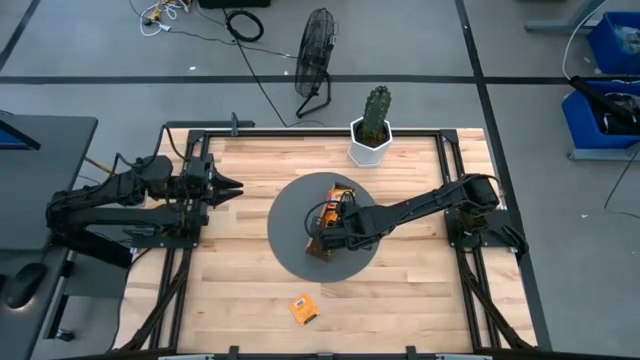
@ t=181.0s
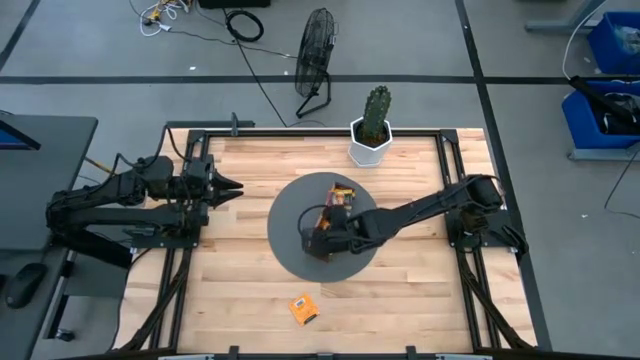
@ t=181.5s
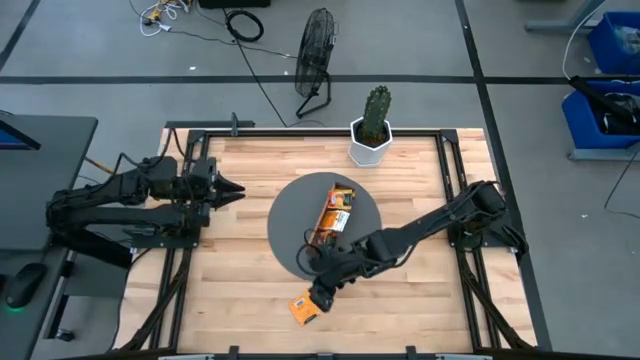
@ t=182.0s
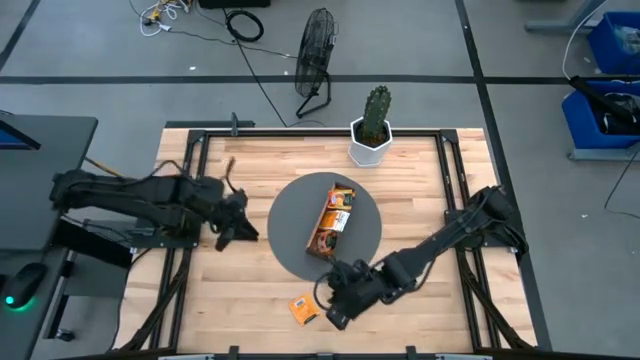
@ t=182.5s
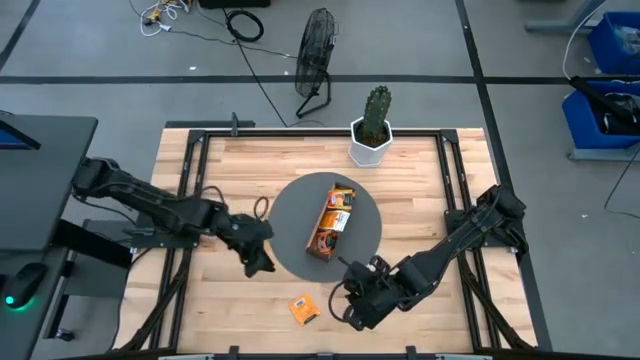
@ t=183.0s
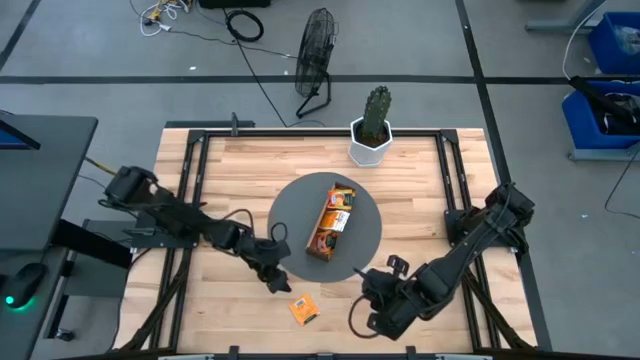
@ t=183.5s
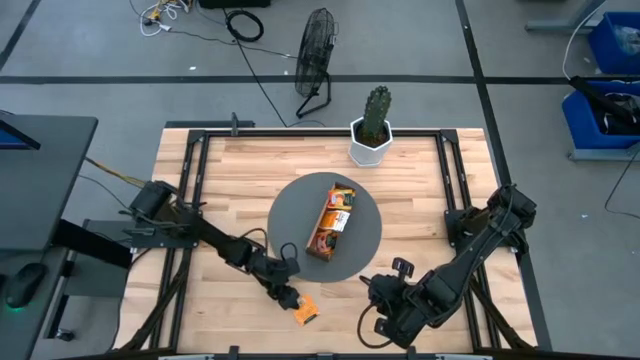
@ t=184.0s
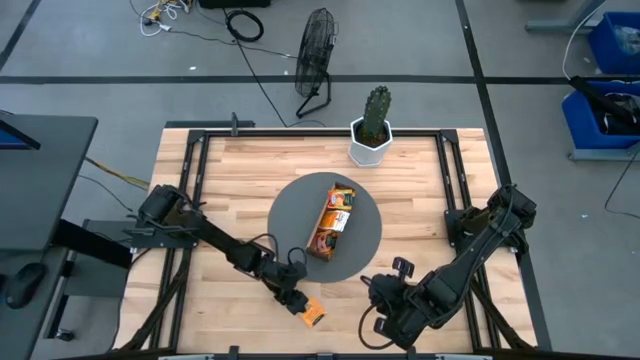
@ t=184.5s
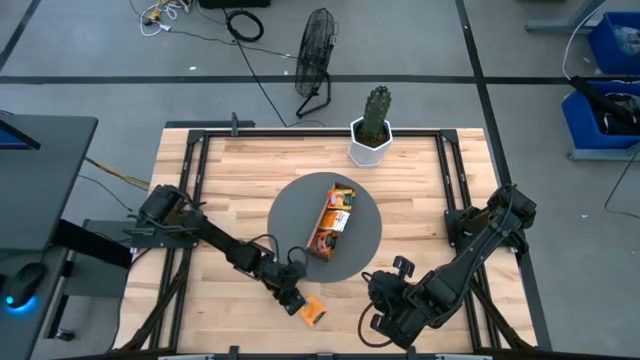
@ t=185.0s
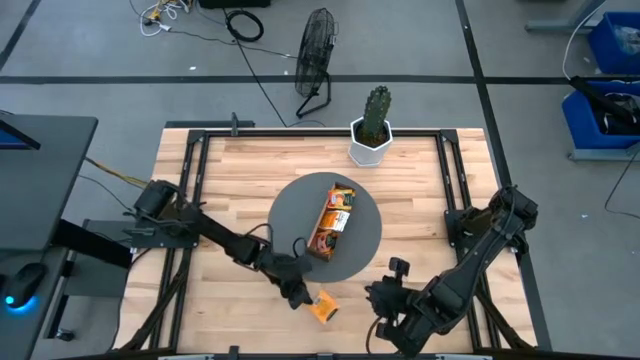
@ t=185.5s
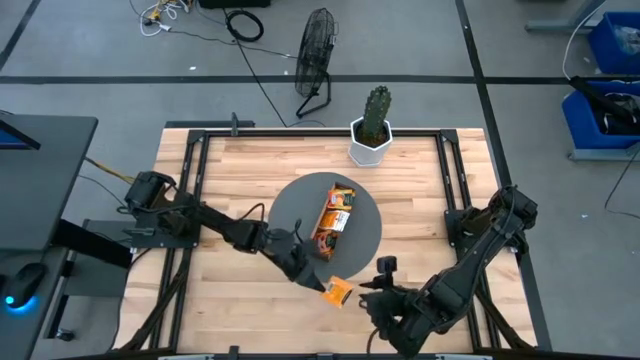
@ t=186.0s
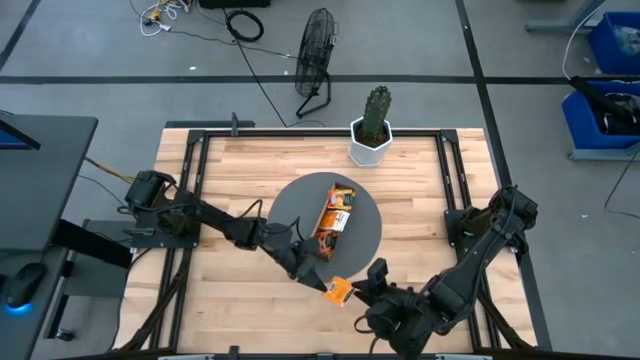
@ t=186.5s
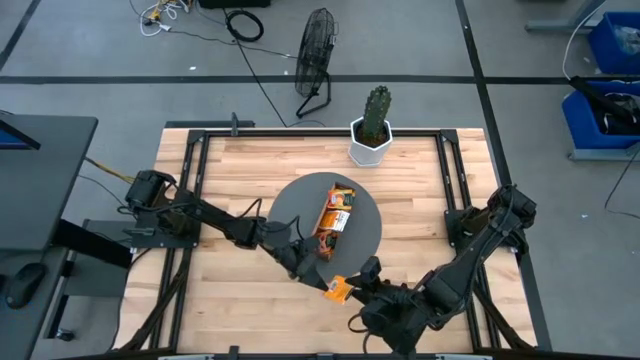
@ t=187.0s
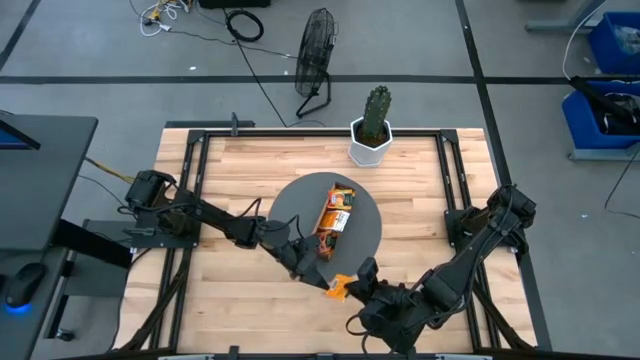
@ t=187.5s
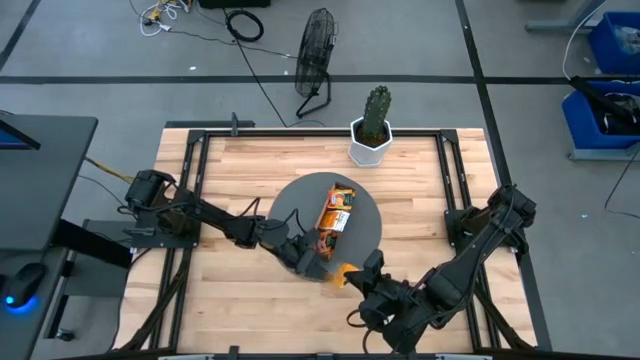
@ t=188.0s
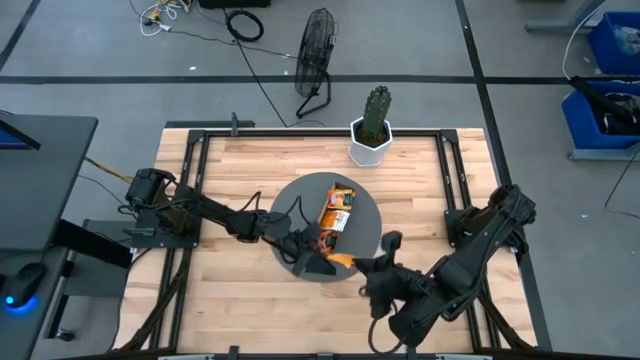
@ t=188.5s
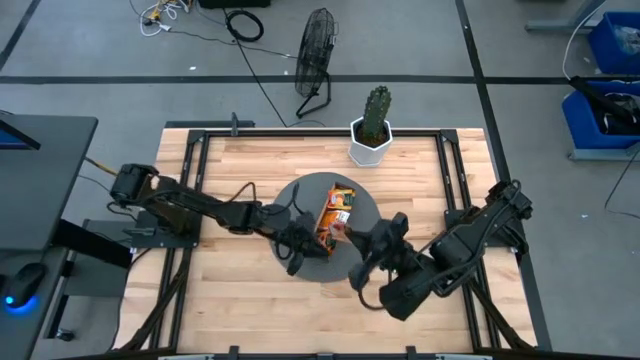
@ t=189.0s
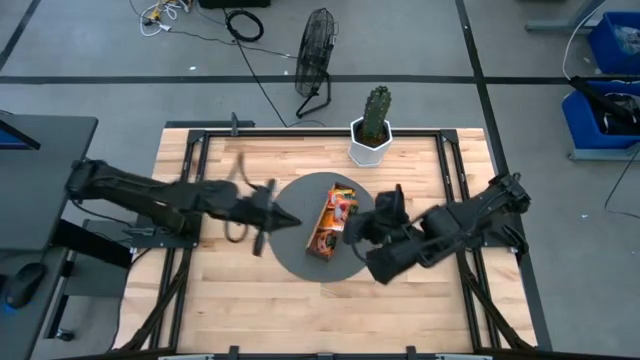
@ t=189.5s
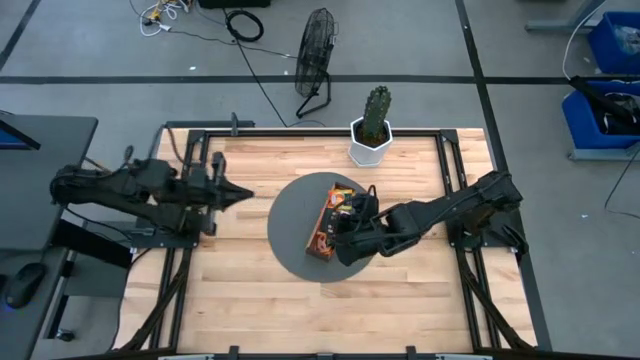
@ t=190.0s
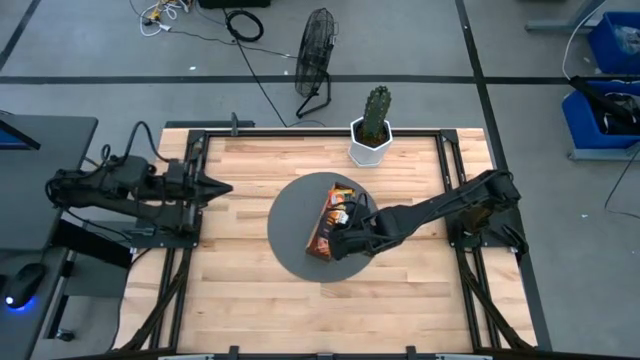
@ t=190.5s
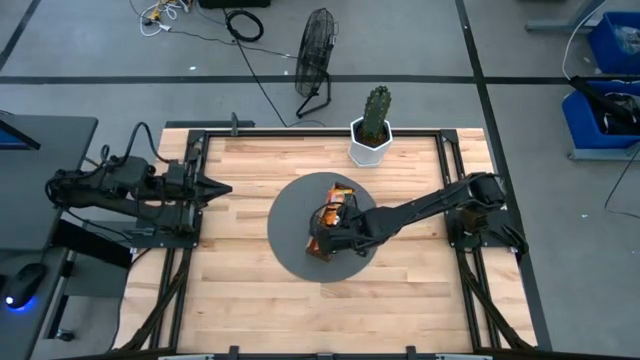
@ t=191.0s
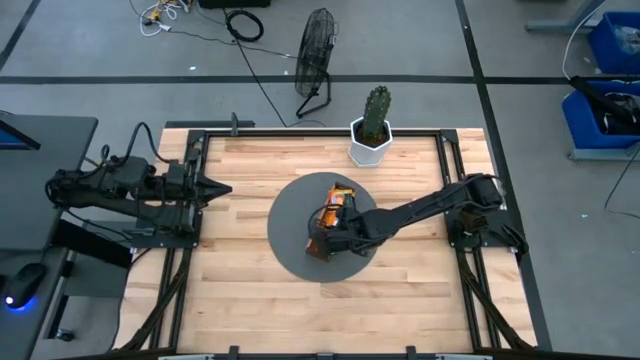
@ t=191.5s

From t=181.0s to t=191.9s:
Task: Pick & Place Tea
Put the red tea bag into the bottom section of the wooden organizer

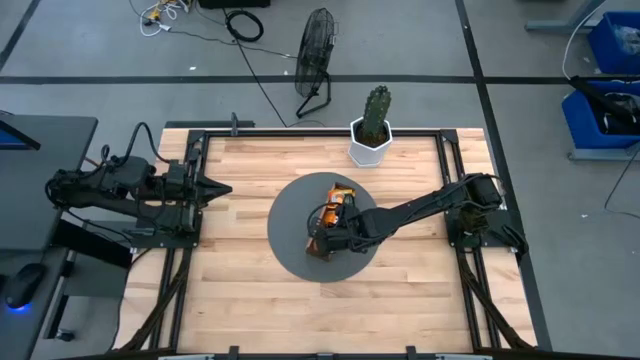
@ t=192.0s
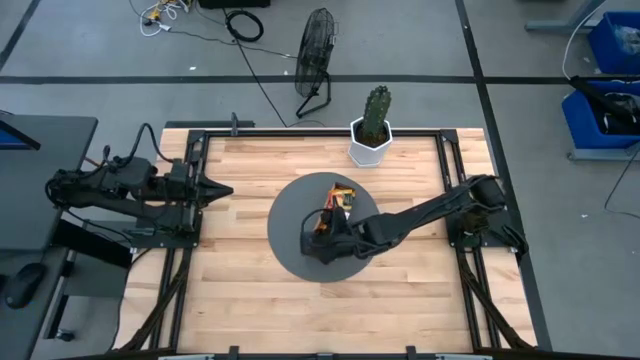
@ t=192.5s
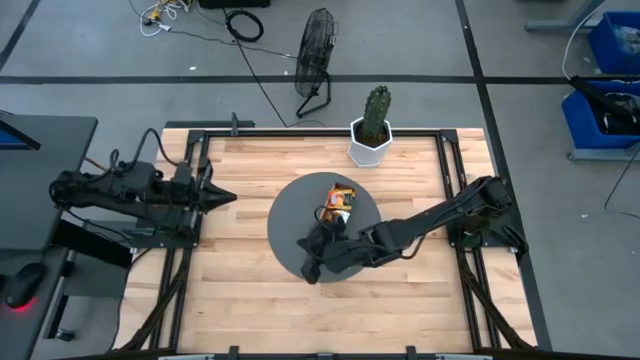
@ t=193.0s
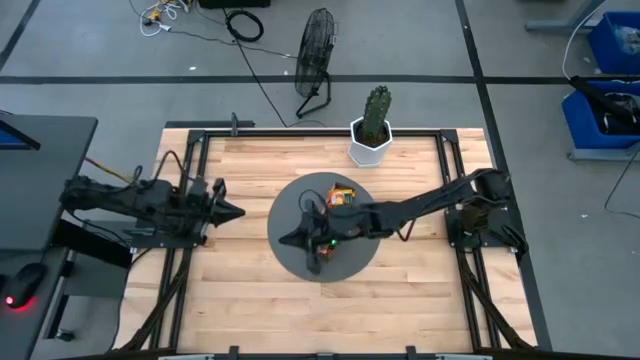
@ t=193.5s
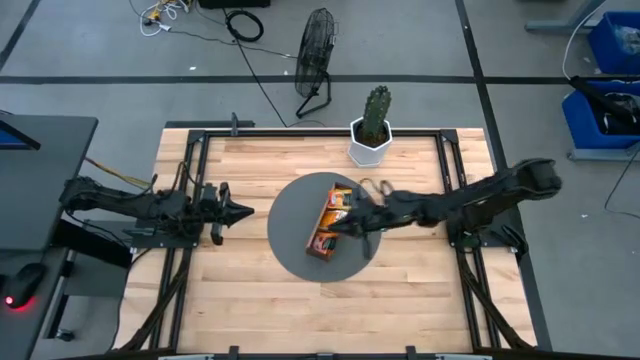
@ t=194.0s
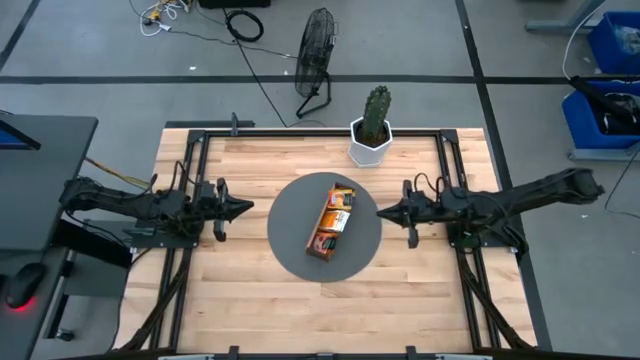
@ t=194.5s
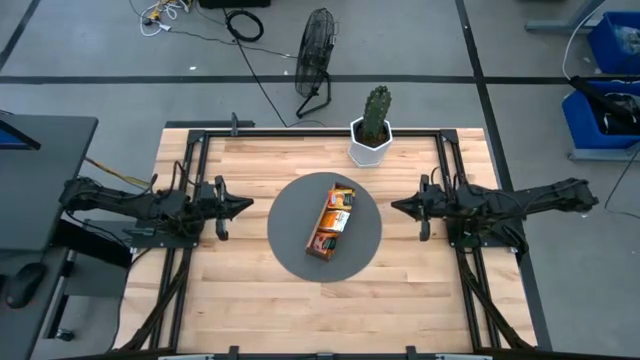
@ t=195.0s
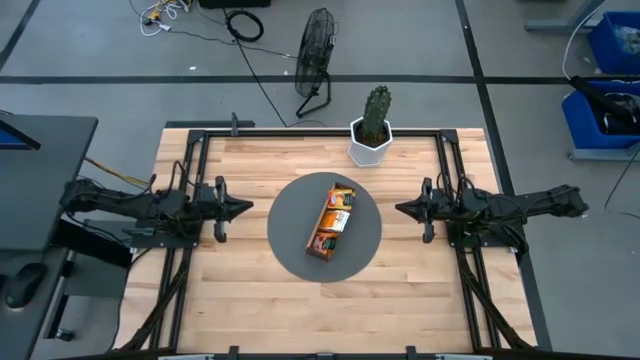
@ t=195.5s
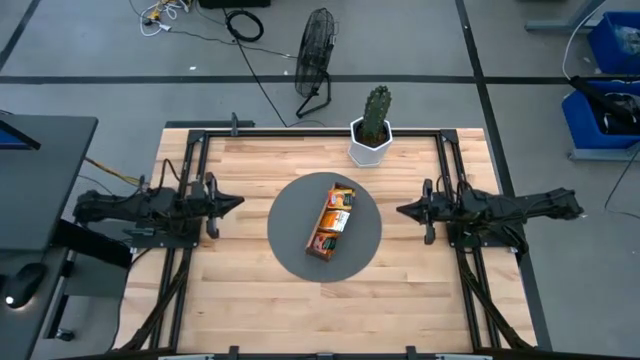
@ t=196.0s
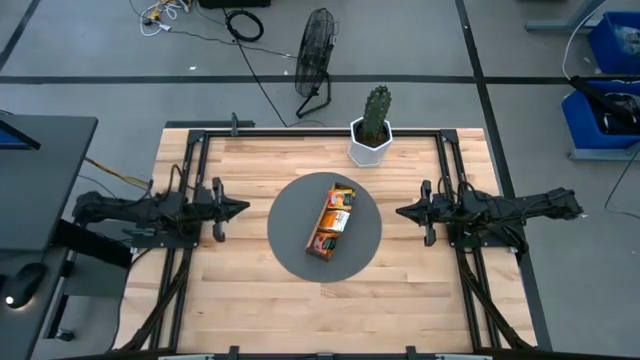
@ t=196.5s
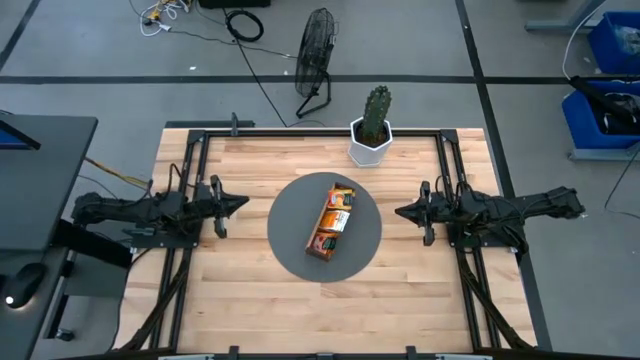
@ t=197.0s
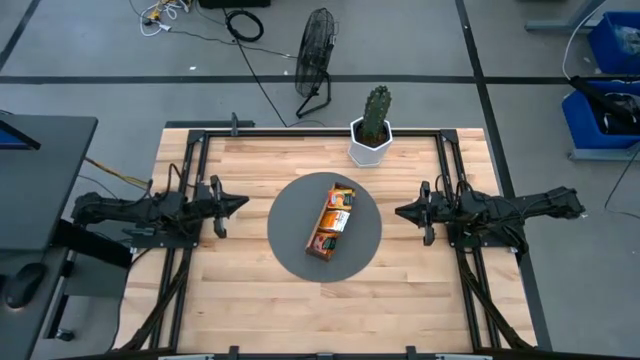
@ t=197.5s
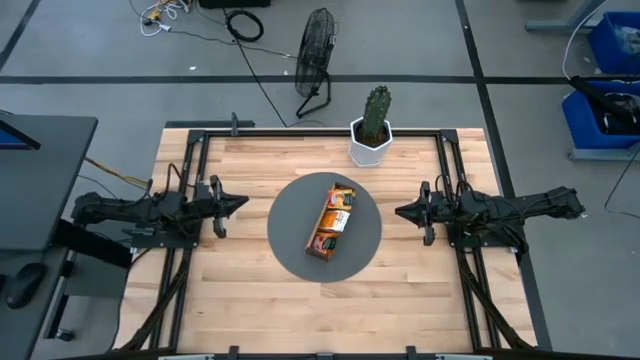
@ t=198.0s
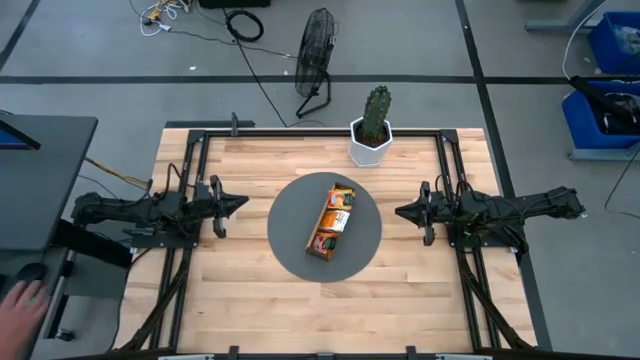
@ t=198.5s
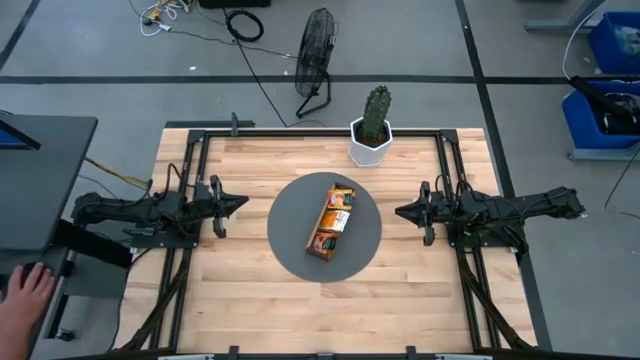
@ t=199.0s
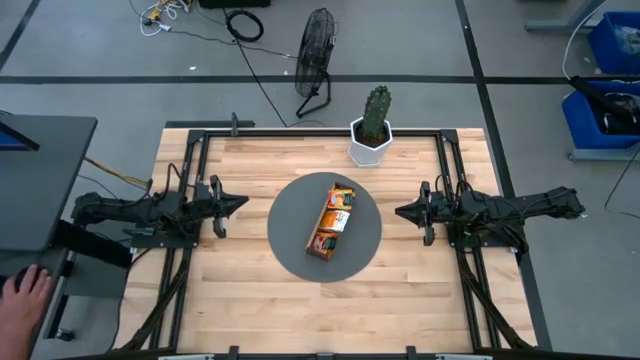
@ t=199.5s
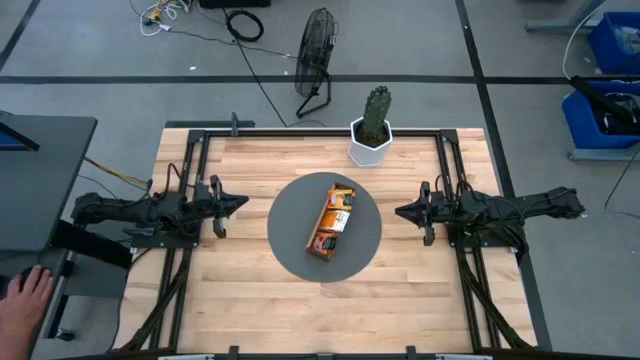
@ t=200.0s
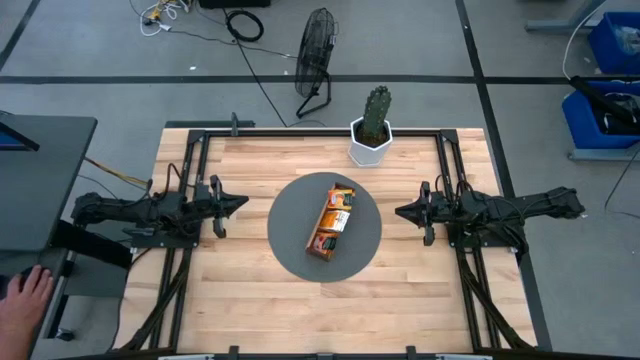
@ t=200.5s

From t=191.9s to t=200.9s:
Return to Home Position

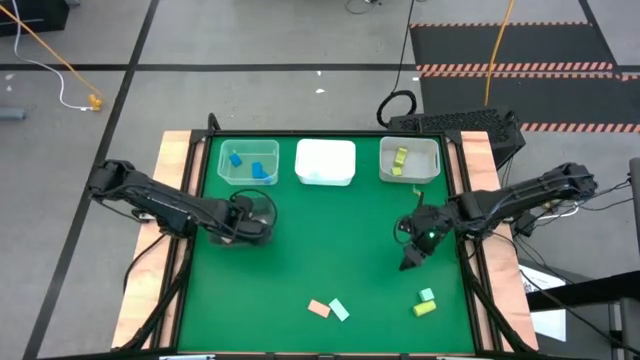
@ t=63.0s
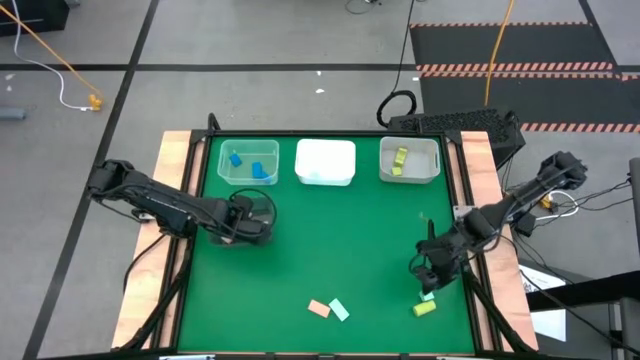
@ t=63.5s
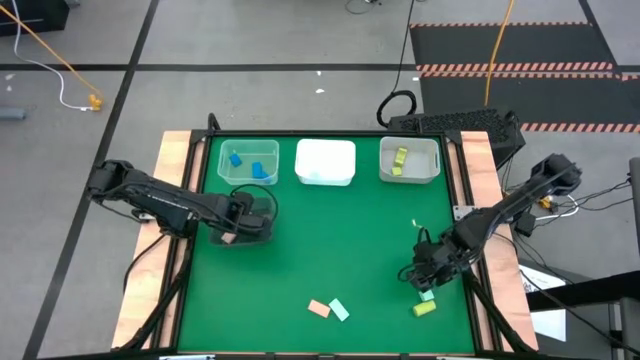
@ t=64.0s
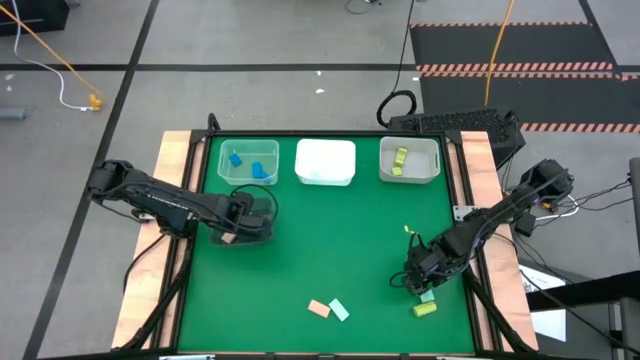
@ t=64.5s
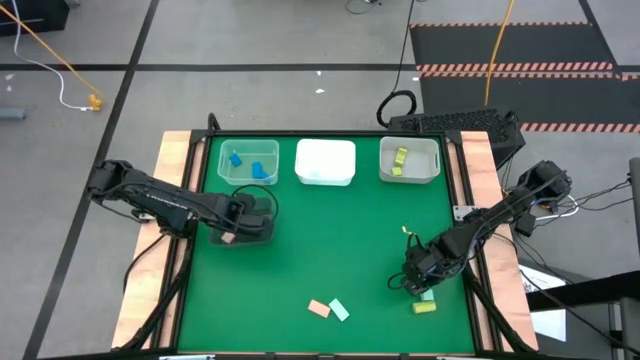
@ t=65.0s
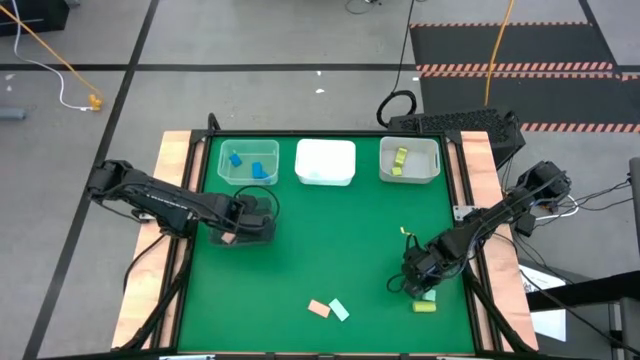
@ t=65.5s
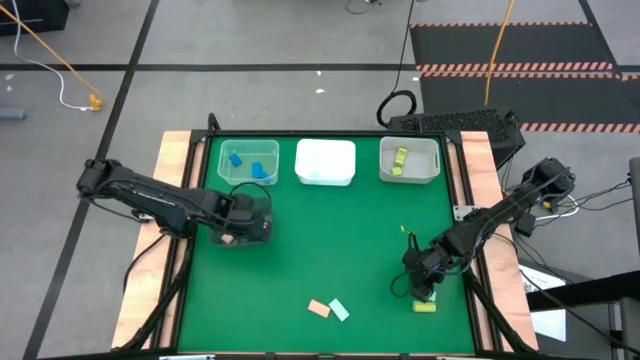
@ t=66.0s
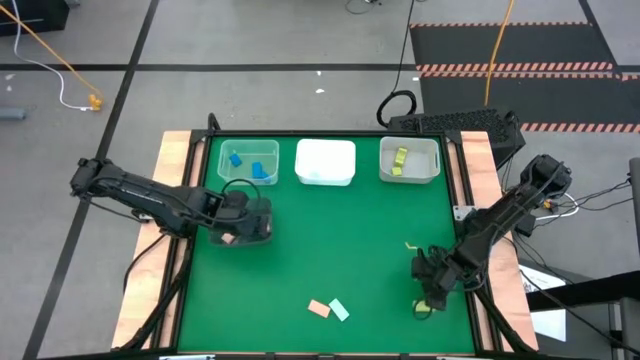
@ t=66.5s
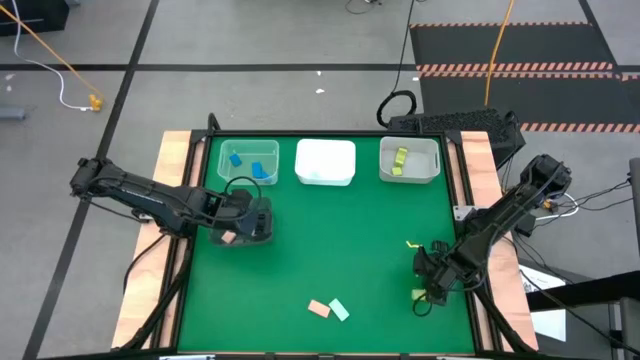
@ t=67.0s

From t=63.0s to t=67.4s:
Task: Sort & place blocks by color
Put the light blue block into the white bin
